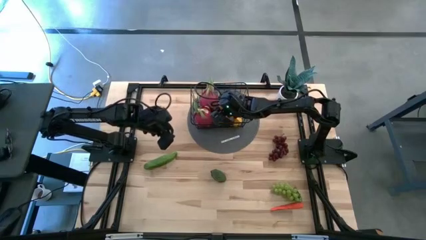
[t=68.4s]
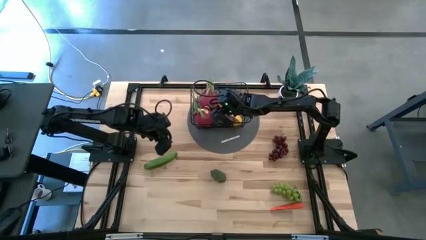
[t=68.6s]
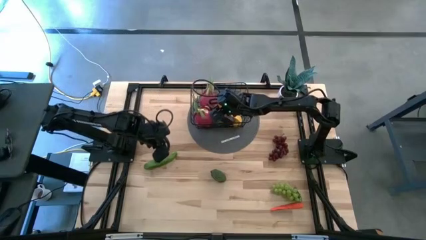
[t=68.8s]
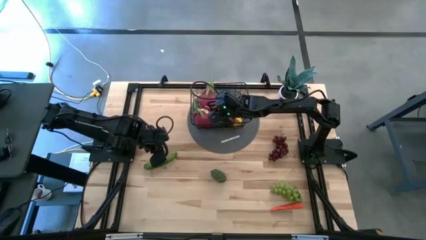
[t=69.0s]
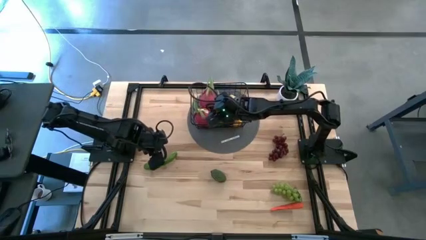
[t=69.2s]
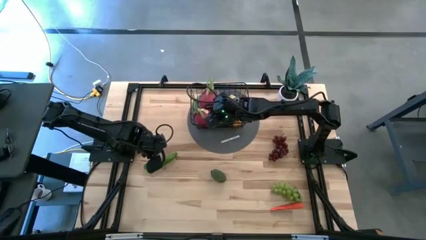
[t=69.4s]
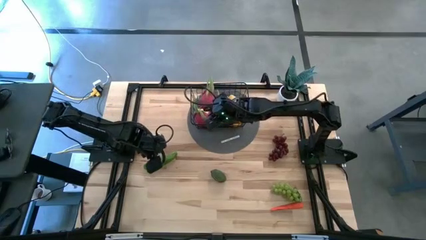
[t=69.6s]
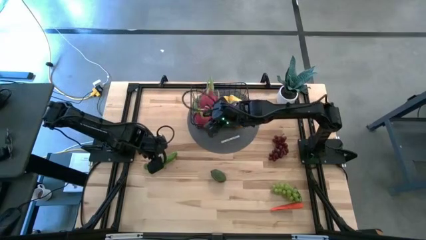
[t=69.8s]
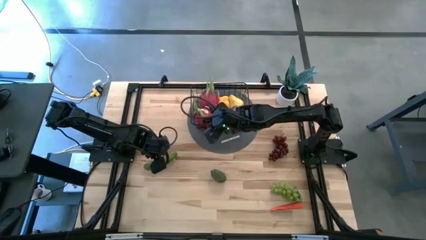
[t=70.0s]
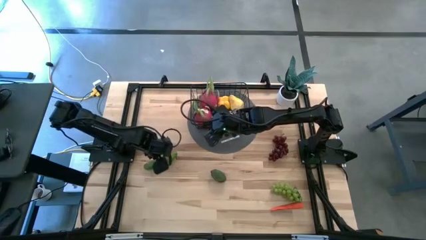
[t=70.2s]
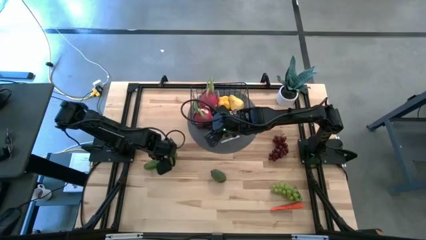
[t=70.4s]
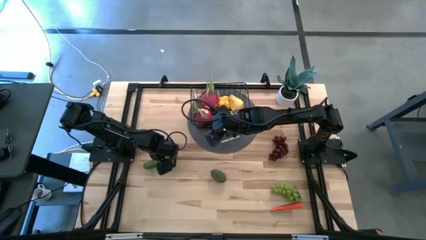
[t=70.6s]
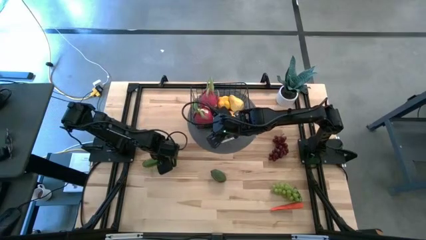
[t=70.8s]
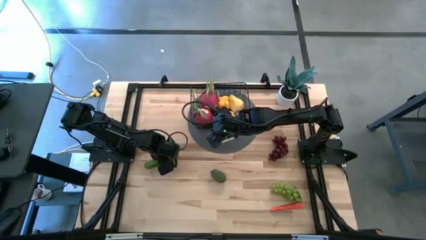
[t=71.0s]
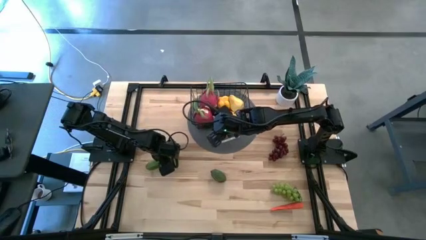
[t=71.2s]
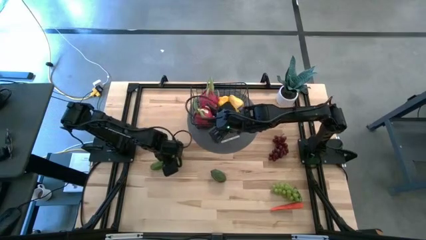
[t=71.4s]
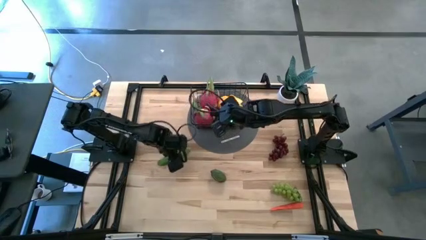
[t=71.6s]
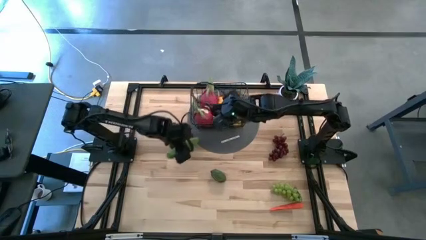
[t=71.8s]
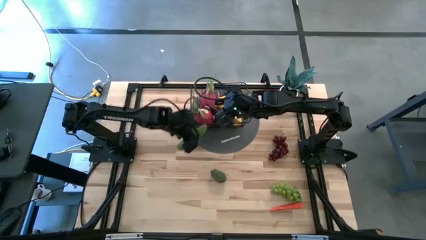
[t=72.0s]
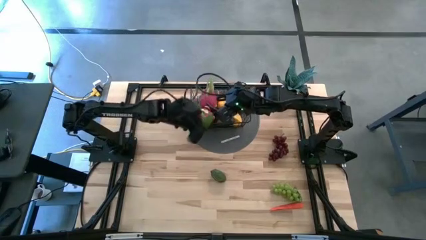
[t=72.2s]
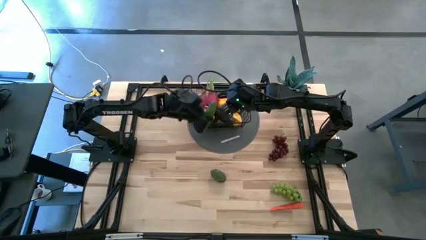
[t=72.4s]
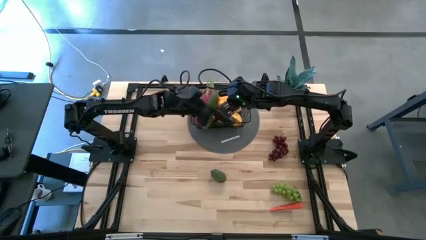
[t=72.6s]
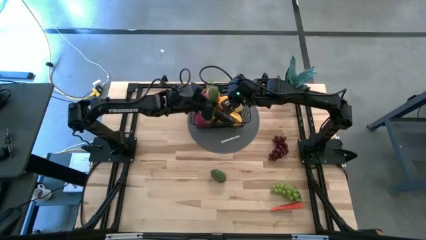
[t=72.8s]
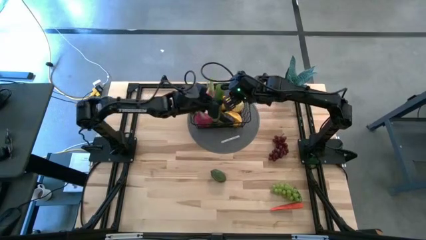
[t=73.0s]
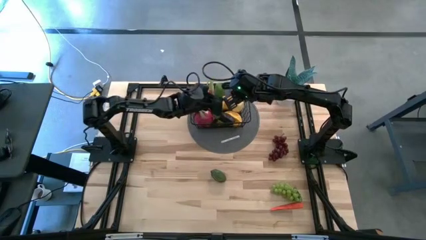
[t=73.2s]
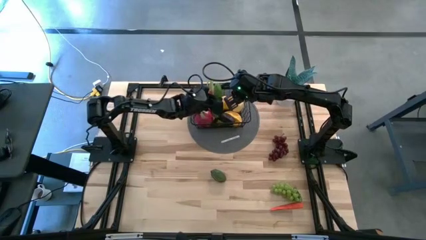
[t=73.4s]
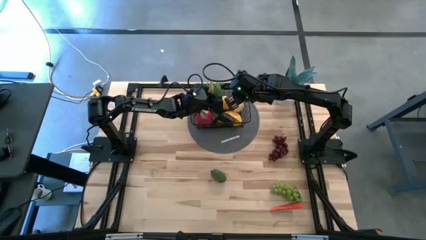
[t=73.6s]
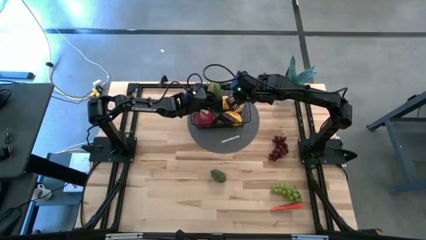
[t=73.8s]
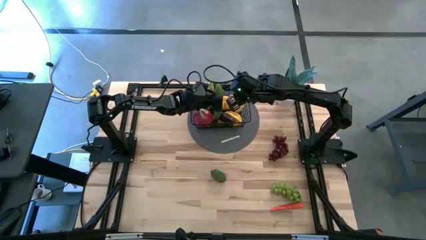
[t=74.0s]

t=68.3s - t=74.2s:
Task: Build produce basket
Put the green cucumber into the black wire basket

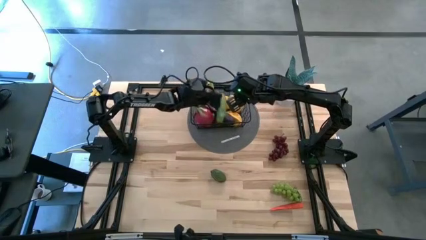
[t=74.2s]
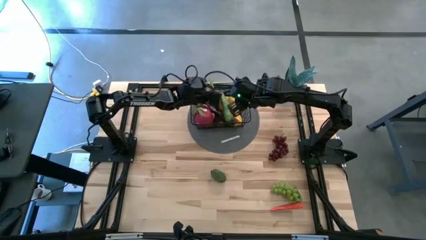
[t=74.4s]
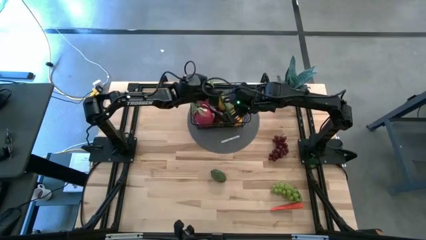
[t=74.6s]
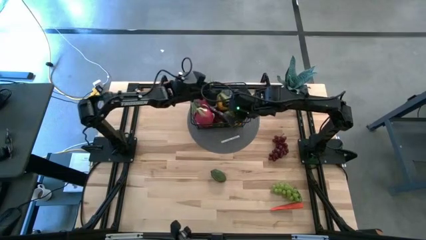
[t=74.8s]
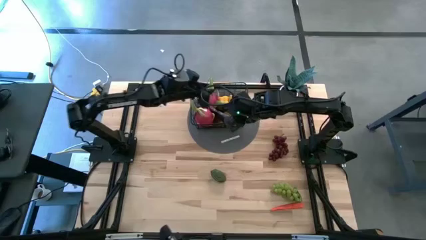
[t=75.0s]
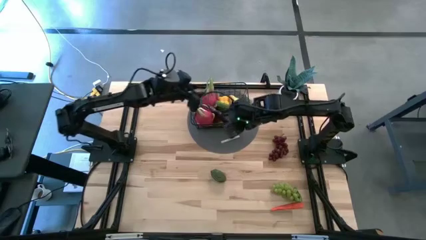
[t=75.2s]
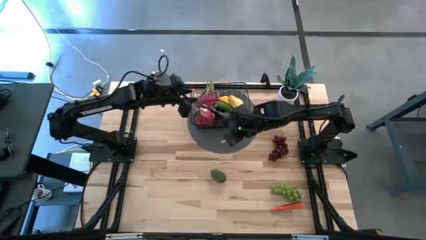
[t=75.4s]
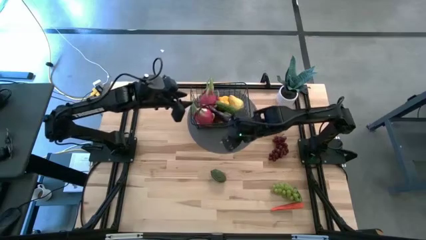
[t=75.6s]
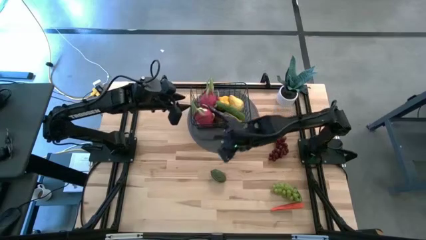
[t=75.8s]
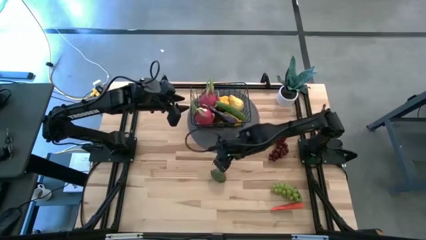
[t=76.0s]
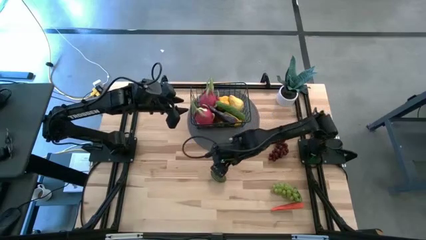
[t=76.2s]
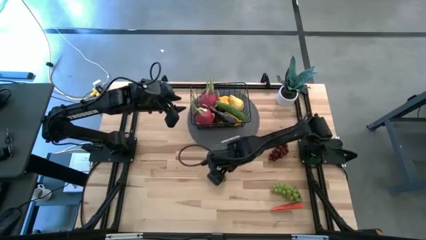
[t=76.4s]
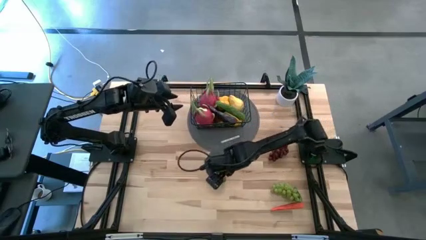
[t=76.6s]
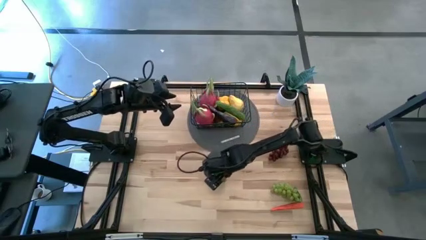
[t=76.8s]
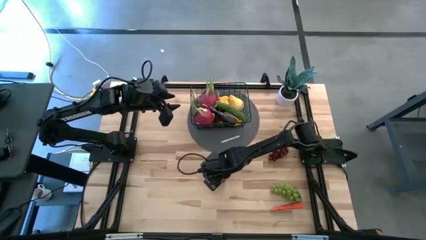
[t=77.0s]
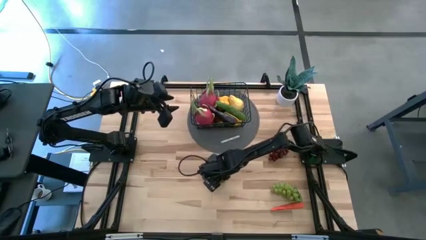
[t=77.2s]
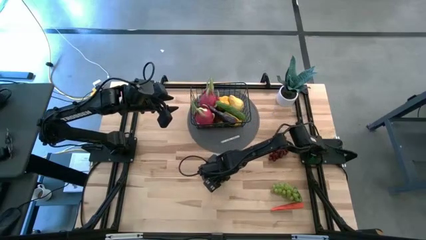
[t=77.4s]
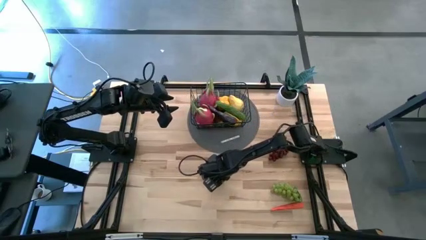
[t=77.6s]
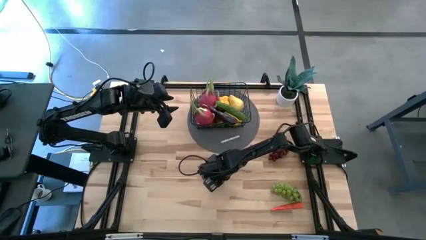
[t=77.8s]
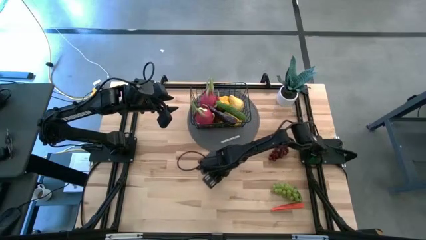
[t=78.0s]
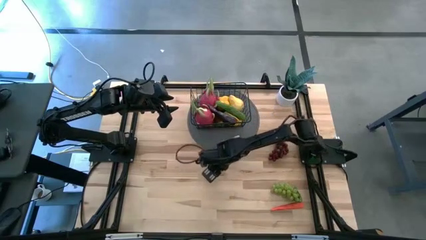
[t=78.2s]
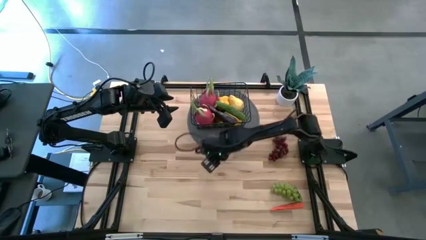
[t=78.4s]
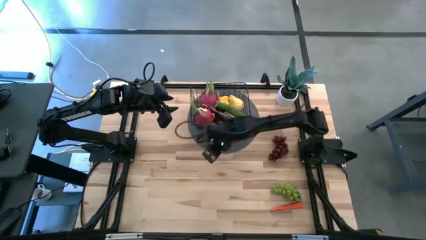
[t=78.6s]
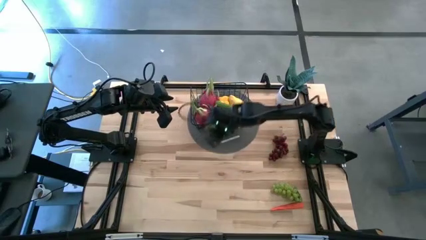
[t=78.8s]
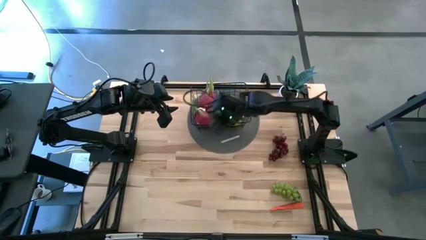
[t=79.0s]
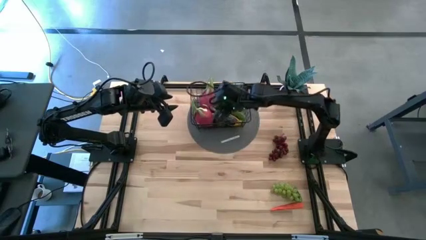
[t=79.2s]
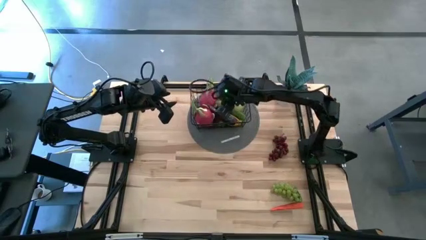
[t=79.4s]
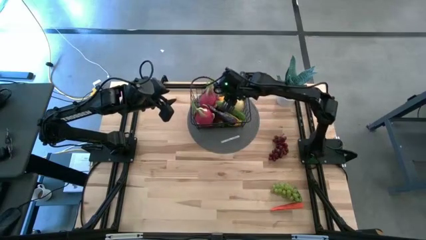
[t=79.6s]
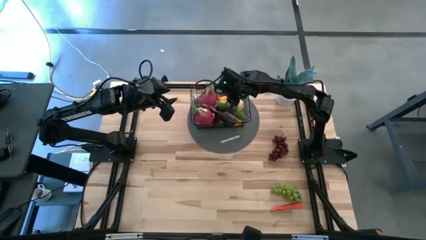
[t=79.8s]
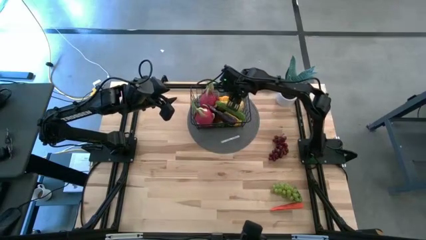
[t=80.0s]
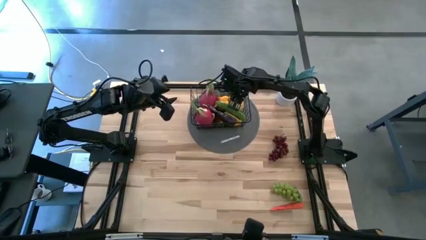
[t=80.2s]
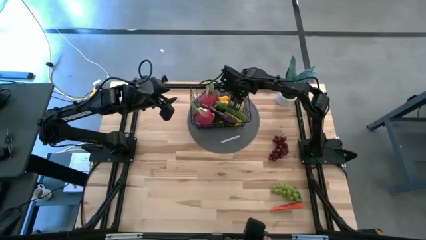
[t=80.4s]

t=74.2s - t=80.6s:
Put the green lime into the black wire basket
